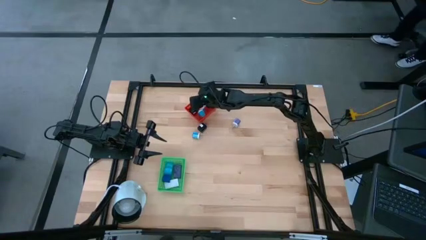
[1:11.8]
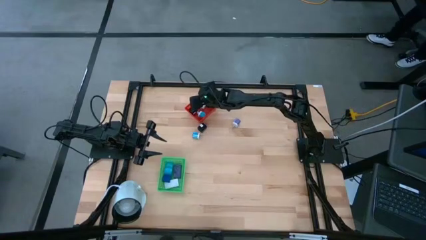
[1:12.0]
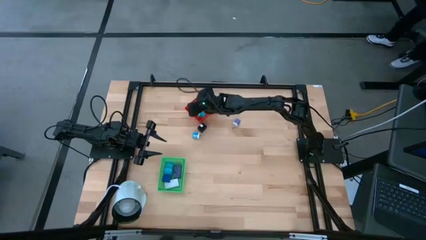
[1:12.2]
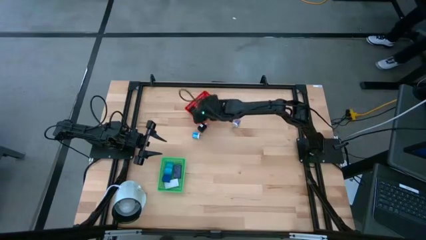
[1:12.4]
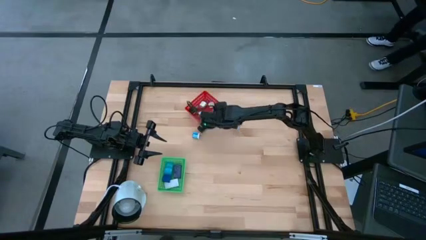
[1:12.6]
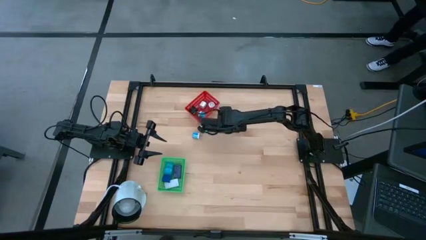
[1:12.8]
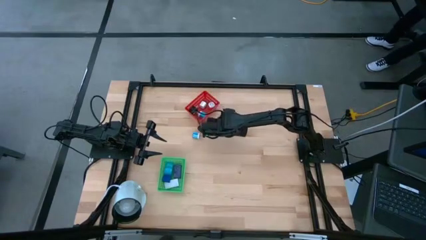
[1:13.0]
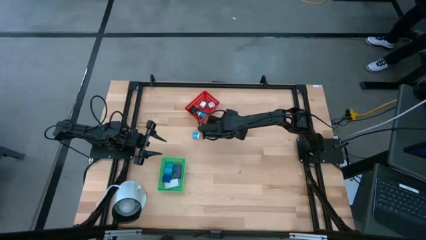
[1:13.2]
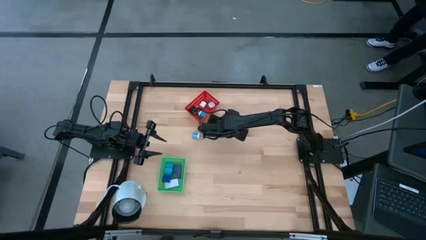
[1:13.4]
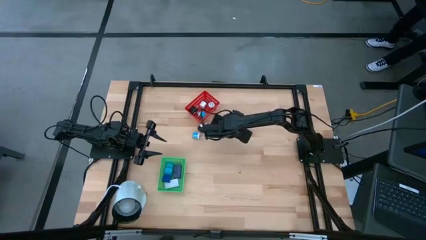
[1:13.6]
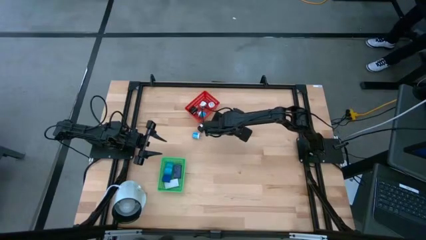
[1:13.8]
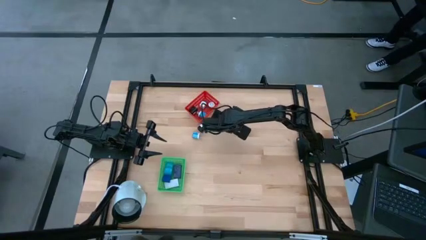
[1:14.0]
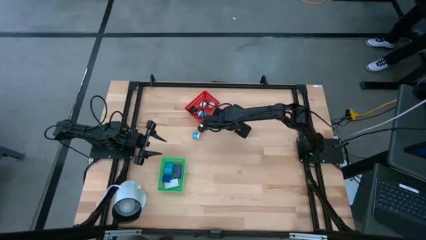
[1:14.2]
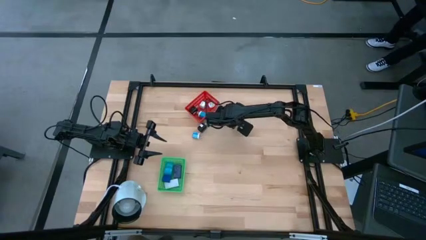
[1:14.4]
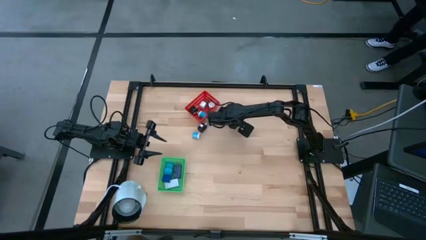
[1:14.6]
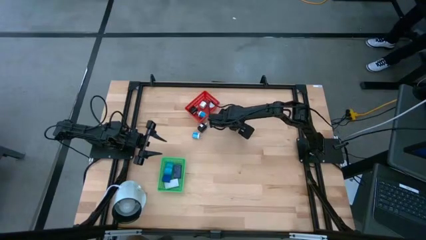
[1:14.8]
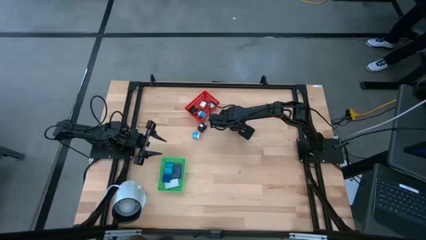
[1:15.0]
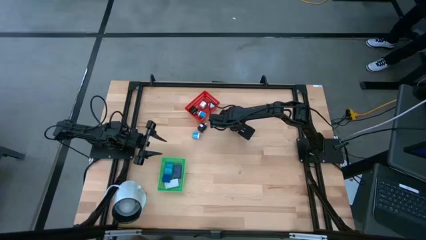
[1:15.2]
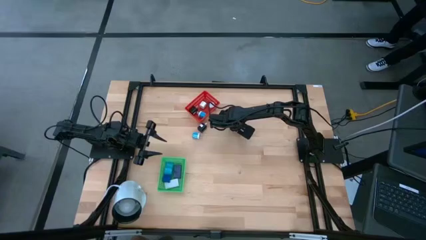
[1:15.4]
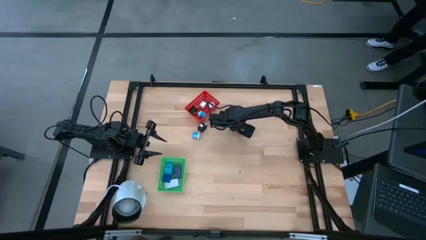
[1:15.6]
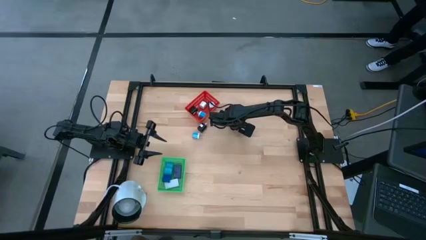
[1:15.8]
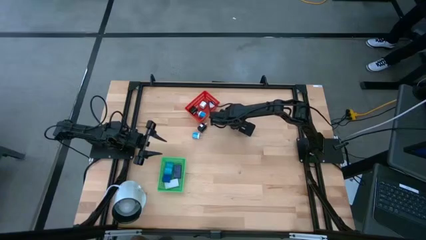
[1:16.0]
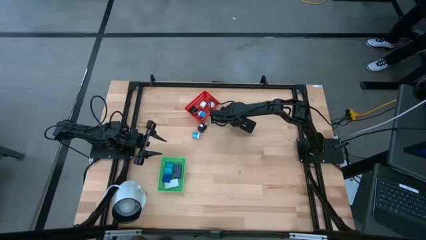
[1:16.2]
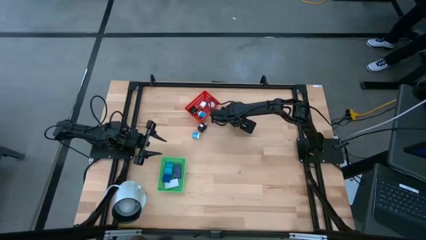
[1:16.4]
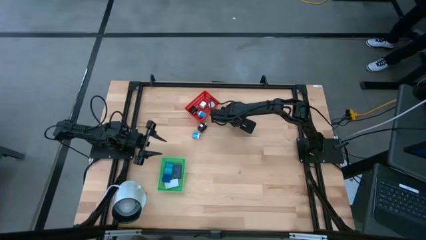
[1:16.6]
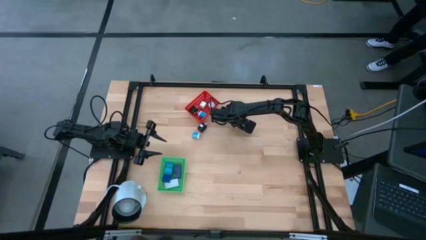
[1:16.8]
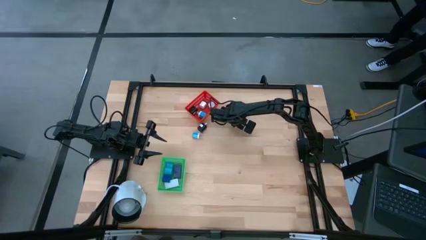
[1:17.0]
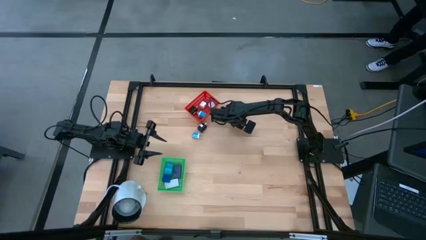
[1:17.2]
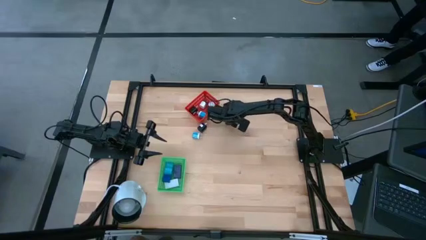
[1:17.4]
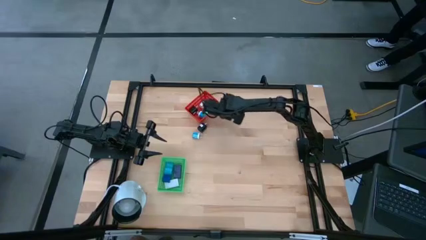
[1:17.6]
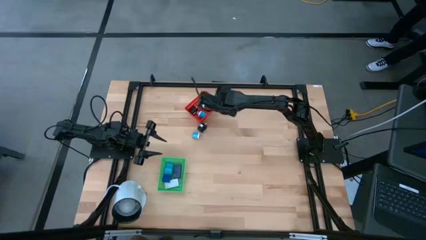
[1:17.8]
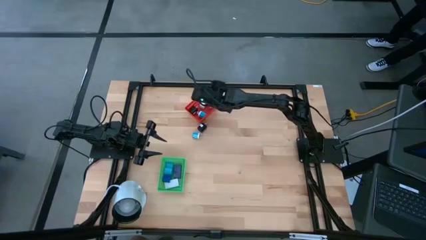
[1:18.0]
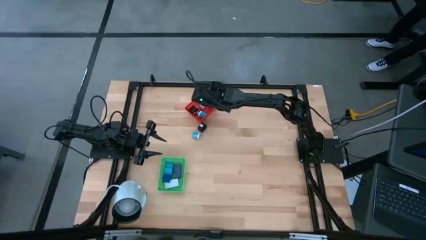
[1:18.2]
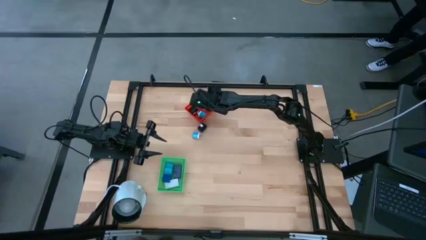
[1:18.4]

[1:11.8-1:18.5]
Task: Pick & Place Office items
Put the violet charger adapter into the red bin

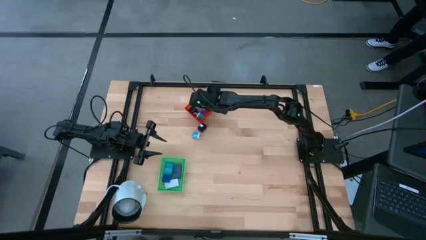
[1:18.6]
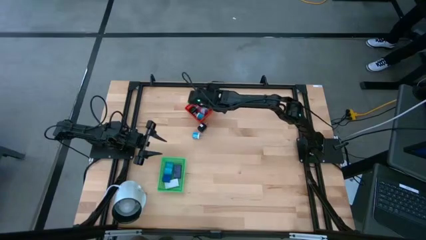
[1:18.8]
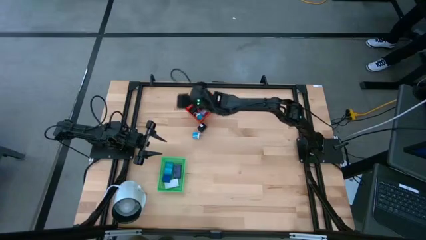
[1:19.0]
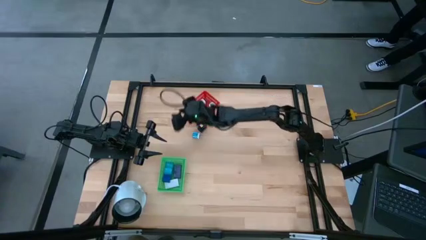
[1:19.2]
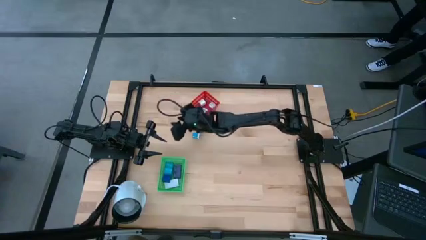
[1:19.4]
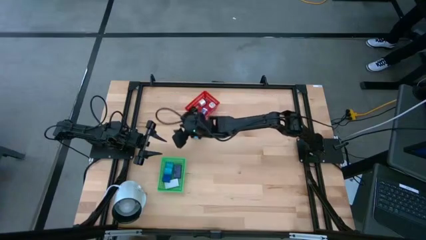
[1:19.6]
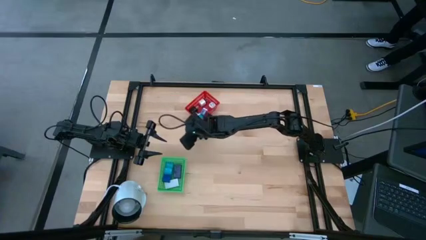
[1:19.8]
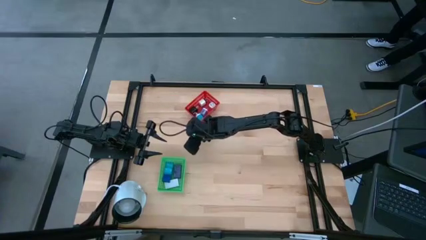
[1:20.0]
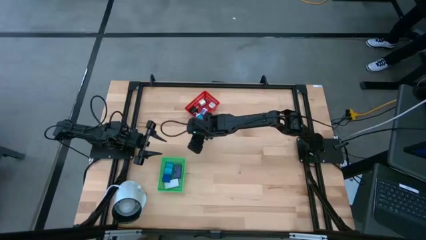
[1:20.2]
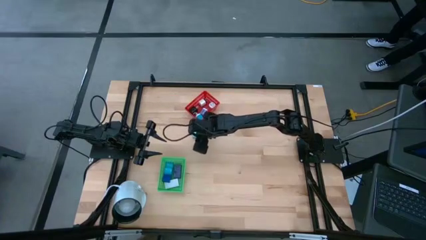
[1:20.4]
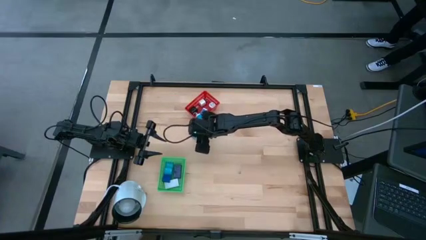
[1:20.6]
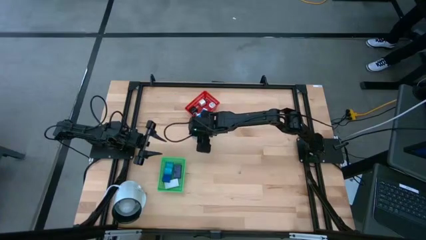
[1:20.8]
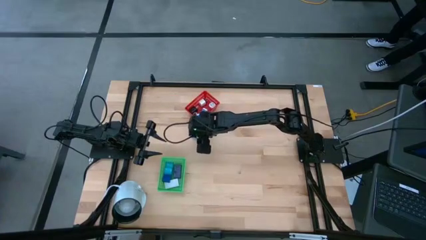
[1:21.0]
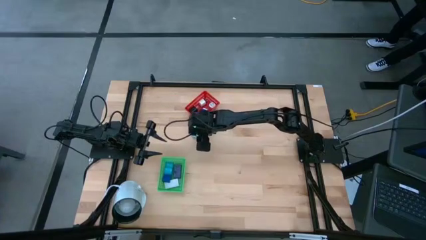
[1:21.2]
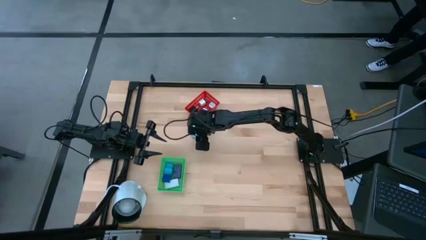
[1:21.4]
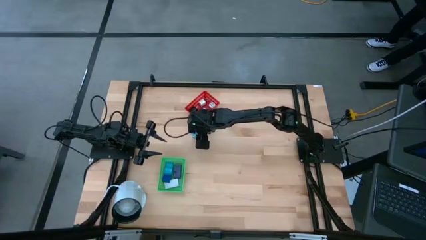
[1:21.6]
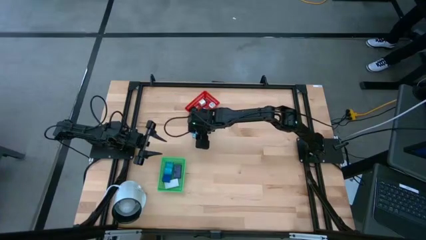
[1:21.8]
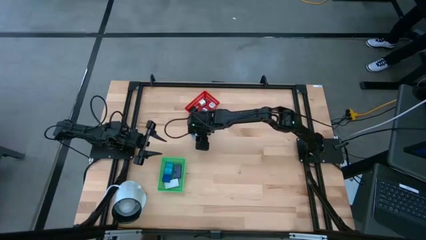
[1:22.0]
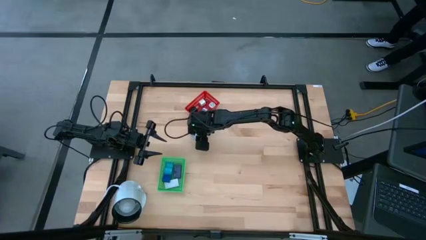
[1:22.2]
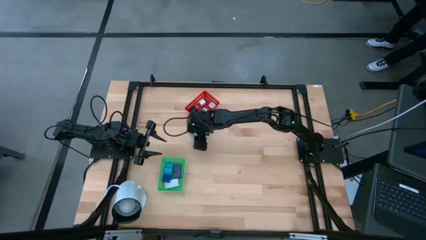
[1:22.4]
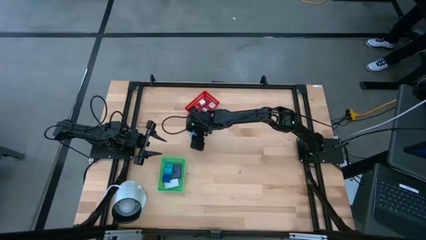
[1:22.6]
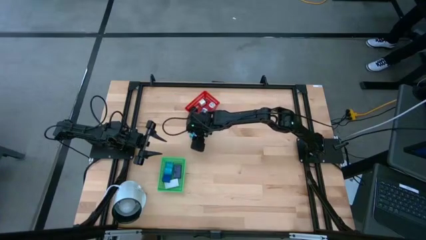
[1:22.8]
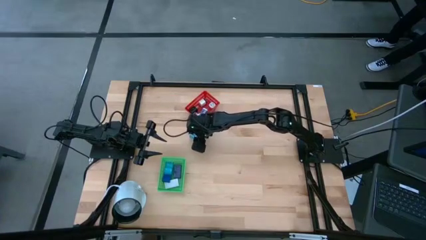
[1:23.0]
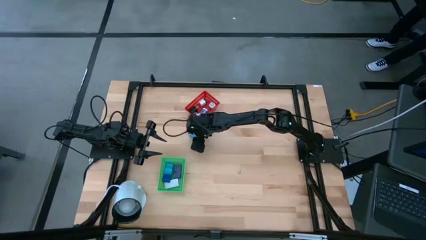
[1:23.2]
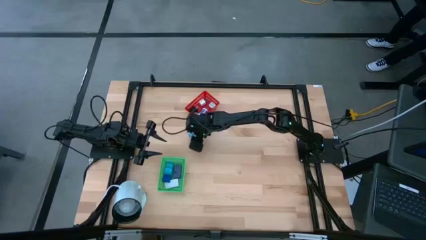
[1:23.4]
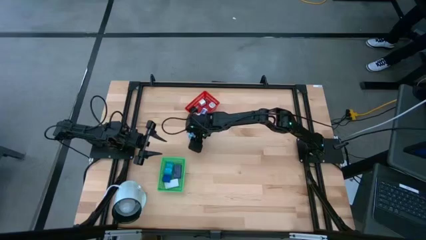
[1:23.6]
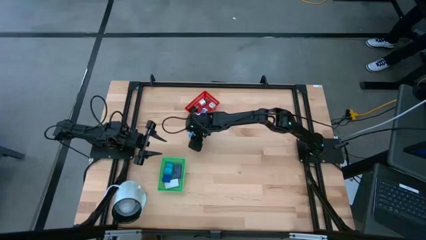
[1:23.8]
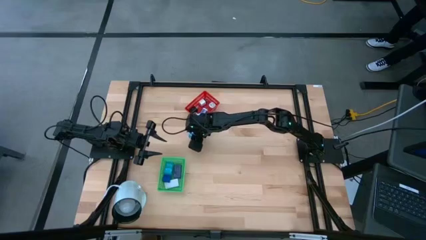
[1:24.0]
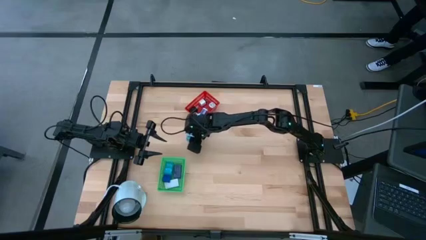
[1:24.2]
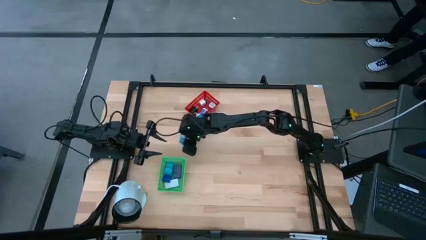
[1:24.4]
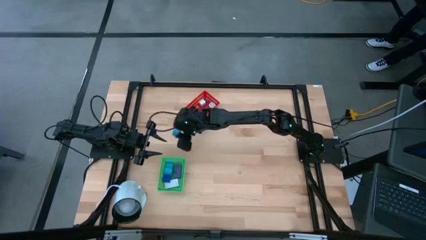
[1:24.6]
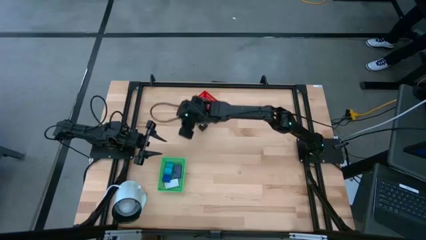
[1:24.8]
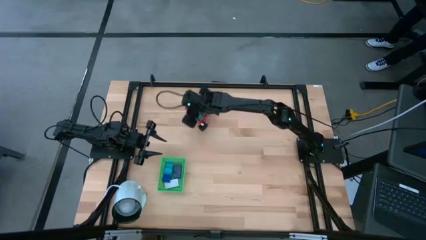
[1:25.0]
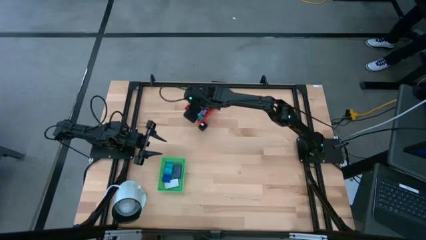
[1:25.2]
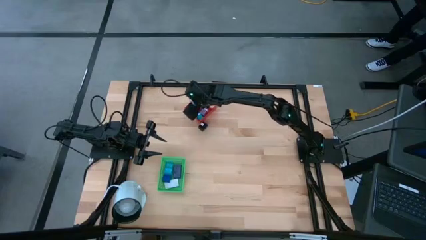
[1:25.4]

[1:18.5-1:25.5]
Put the blue charger adapter into the red bin

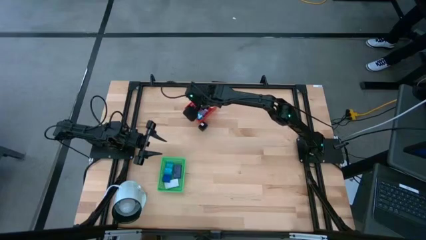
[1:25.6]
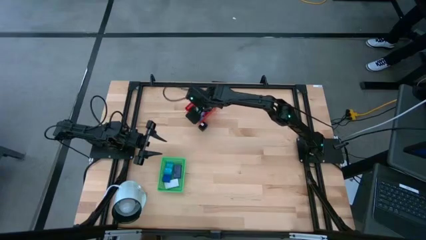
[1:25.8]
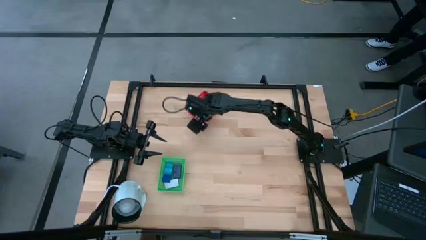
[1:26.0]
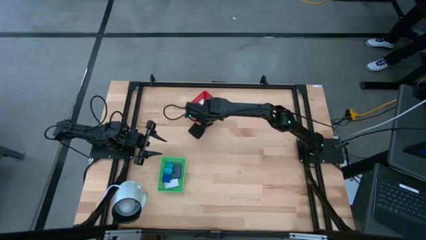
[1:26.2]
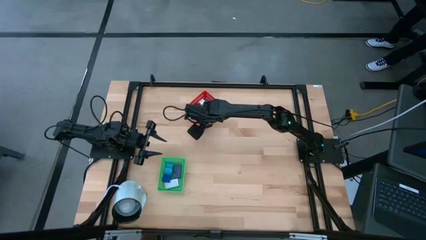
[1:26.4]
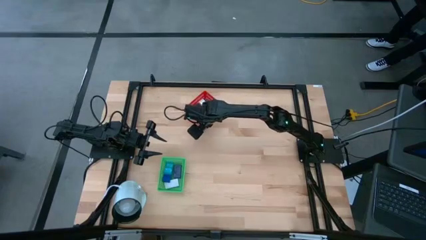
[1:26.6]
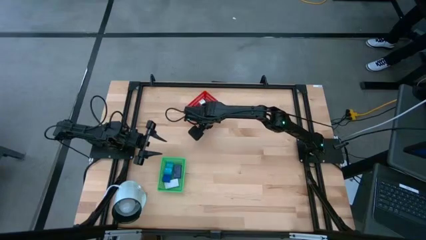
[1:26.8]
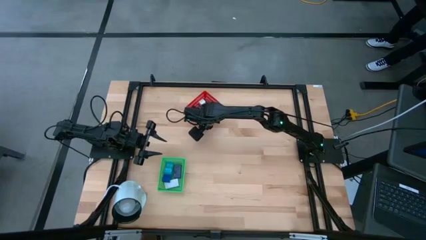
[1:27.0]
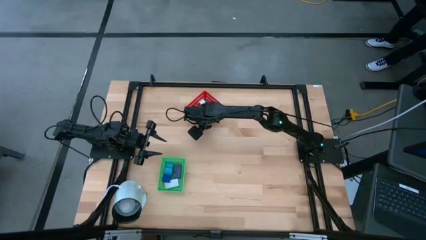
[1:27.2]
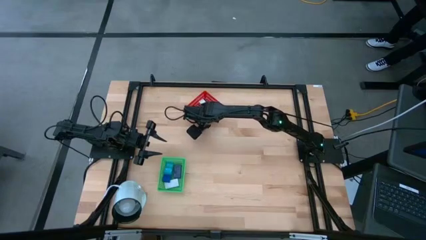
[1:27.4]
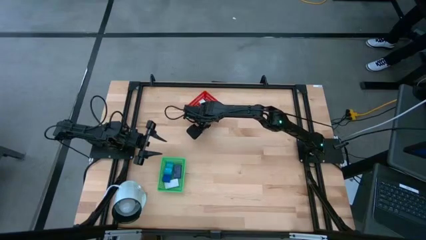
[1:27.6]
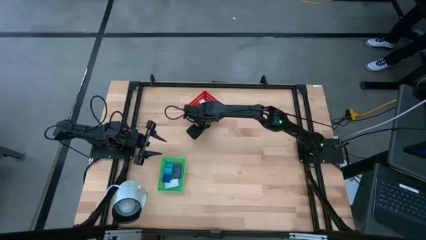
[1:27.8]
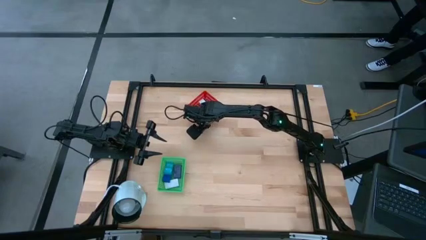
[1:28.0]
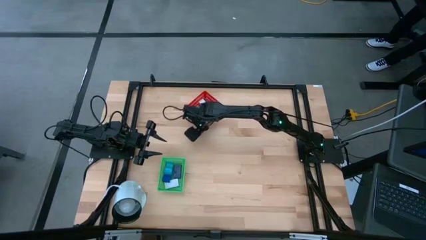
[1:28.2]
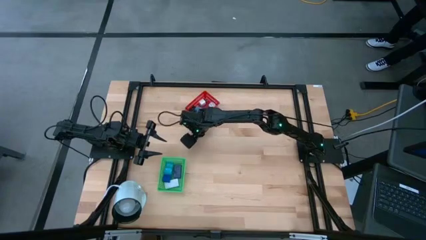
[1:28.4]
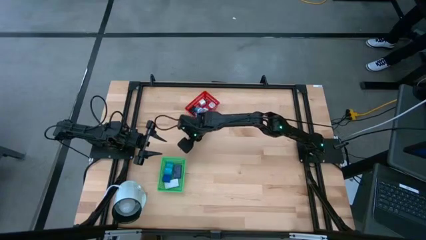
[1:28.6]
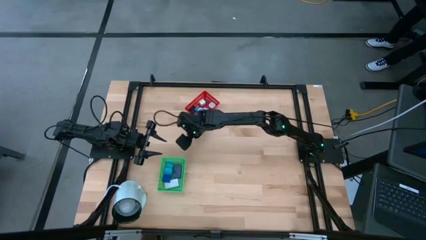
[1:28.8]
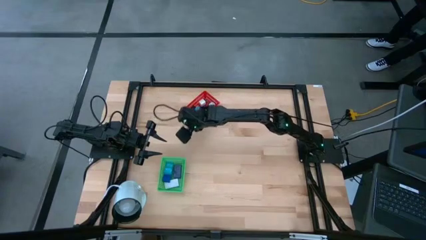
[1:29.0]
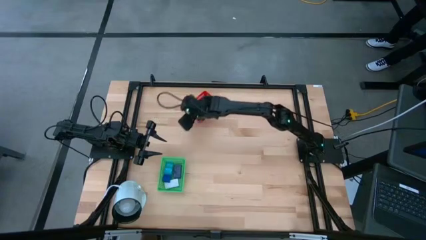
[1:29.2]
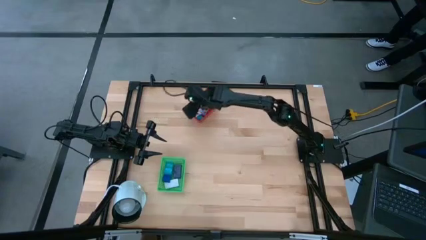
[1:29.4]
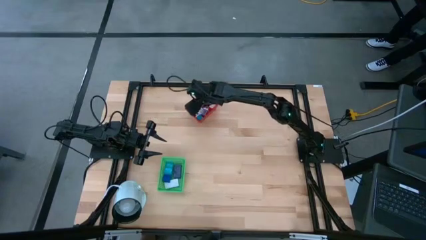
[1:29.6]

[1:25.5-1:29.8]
Put the black charger adapter into the red bin
